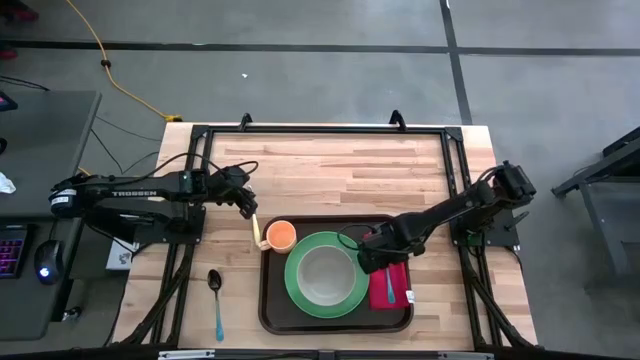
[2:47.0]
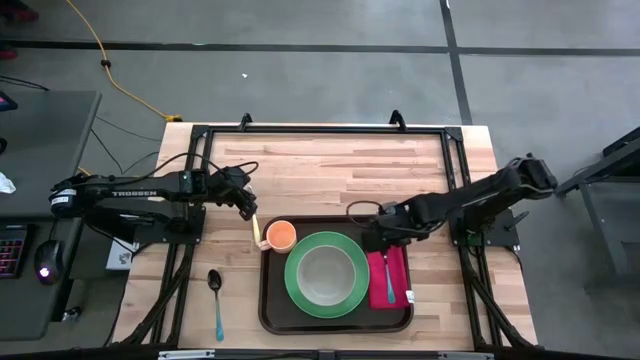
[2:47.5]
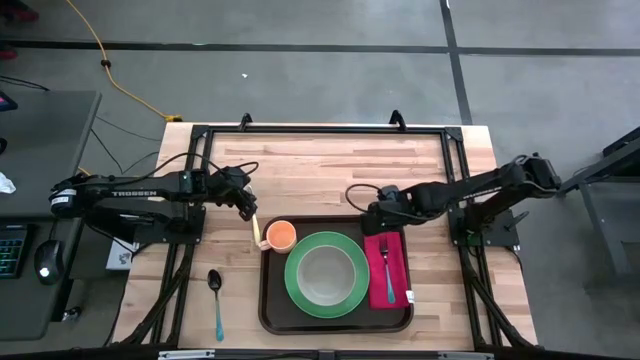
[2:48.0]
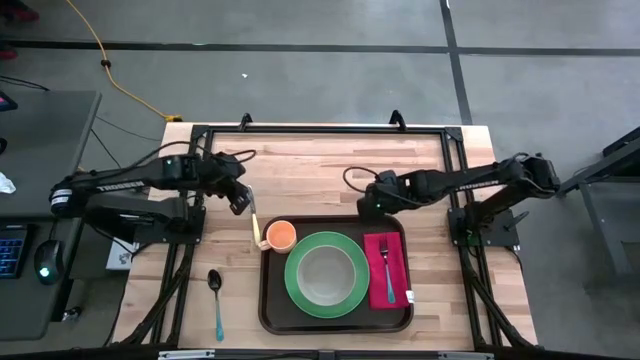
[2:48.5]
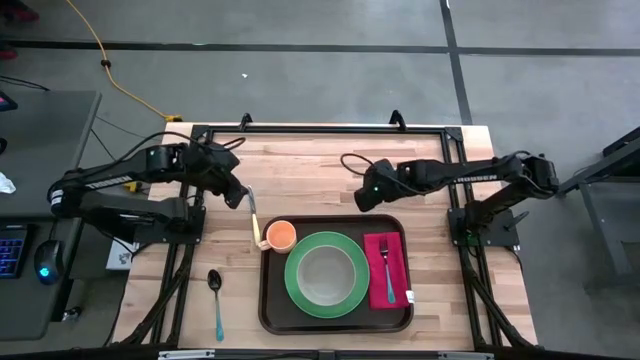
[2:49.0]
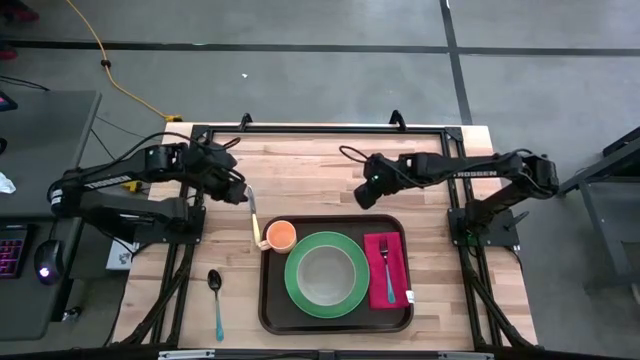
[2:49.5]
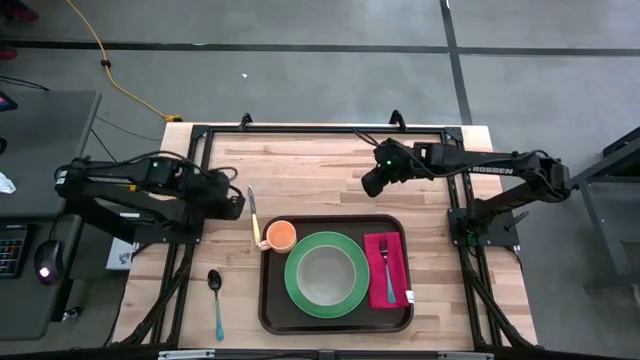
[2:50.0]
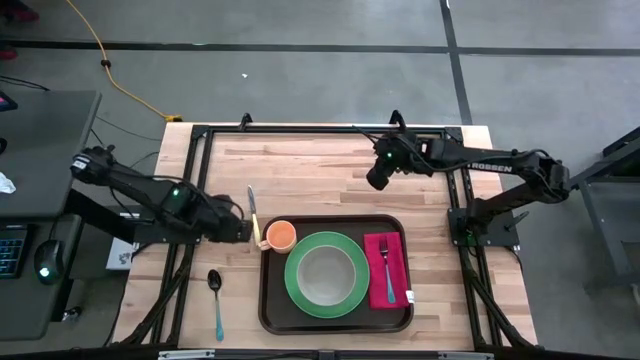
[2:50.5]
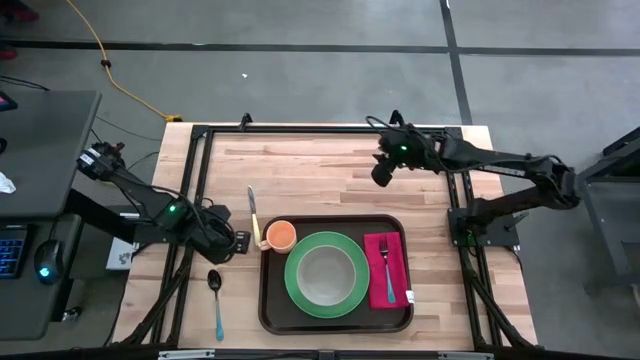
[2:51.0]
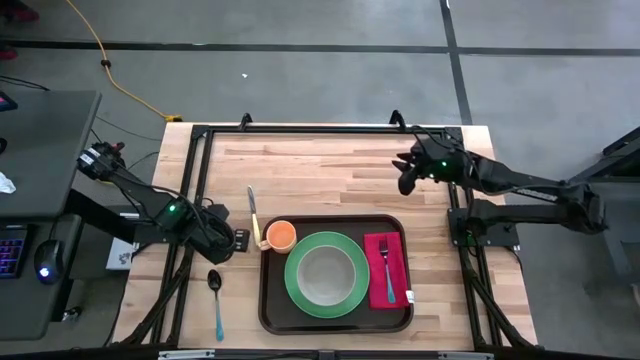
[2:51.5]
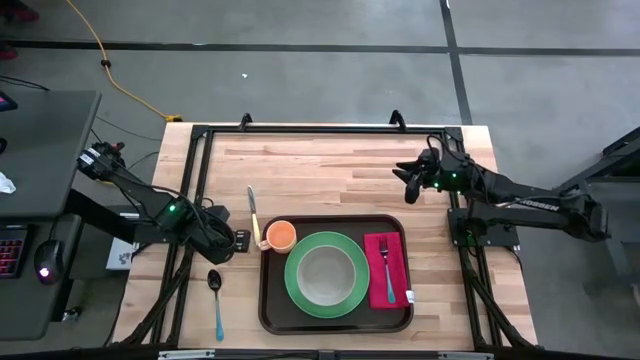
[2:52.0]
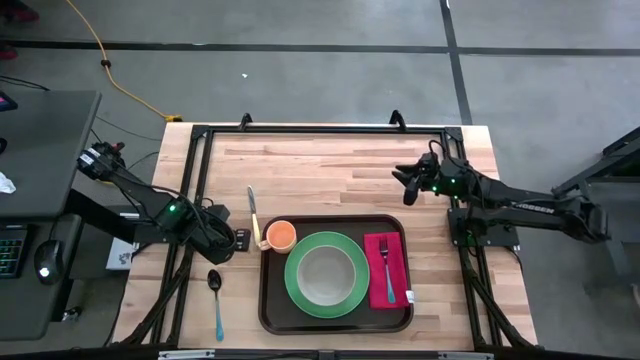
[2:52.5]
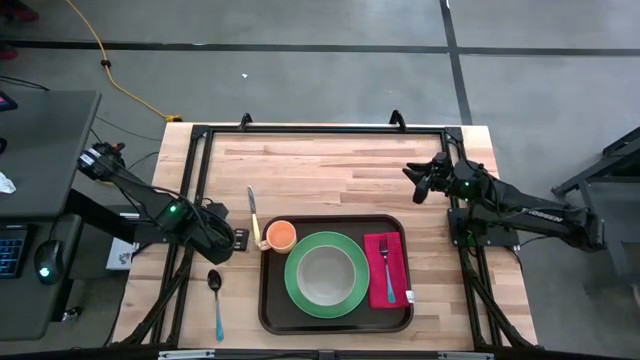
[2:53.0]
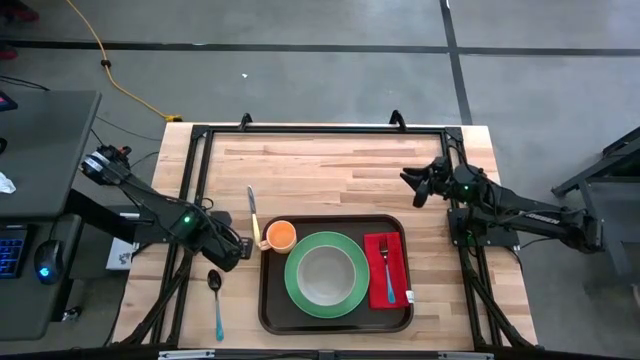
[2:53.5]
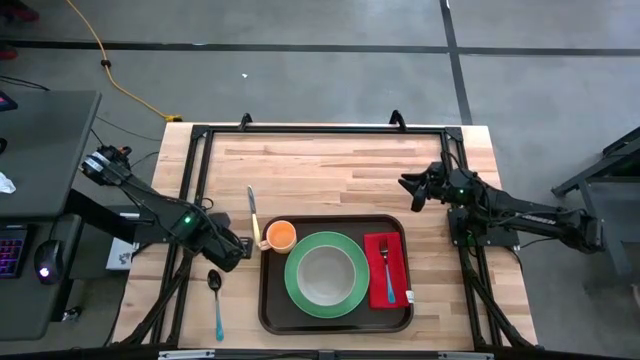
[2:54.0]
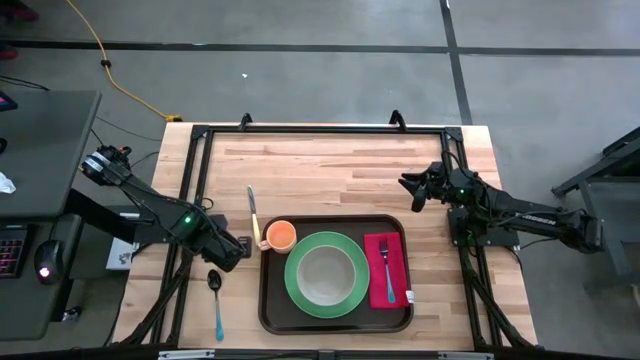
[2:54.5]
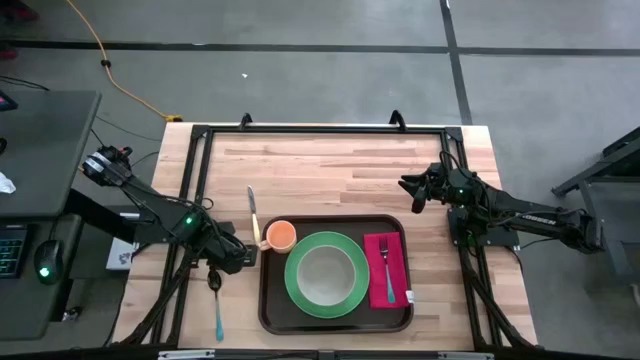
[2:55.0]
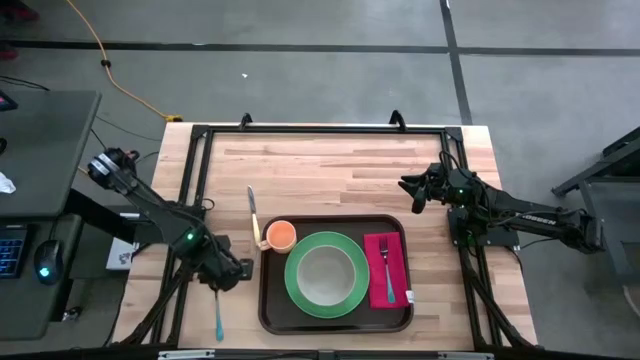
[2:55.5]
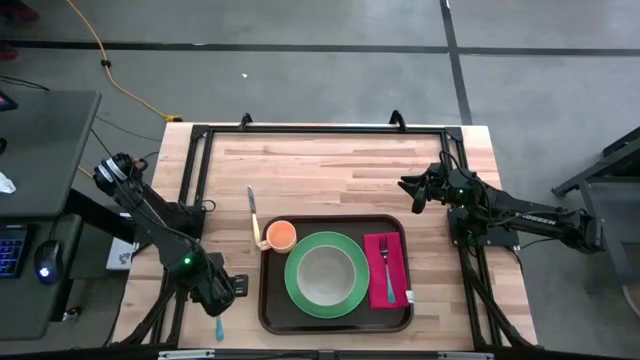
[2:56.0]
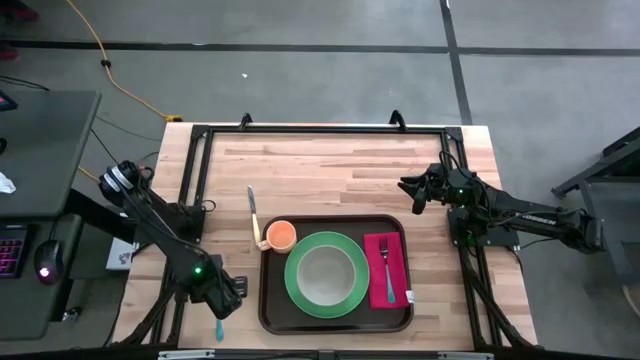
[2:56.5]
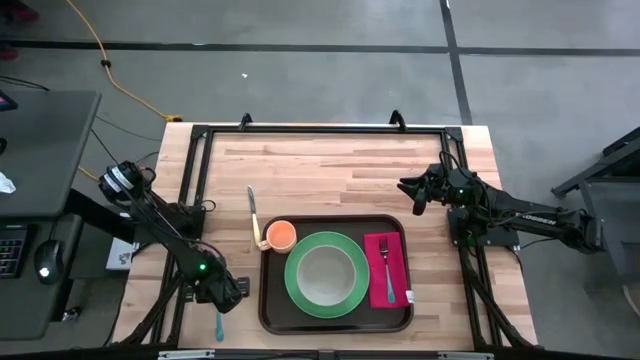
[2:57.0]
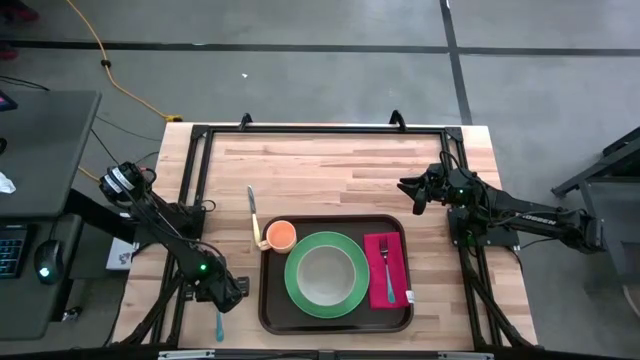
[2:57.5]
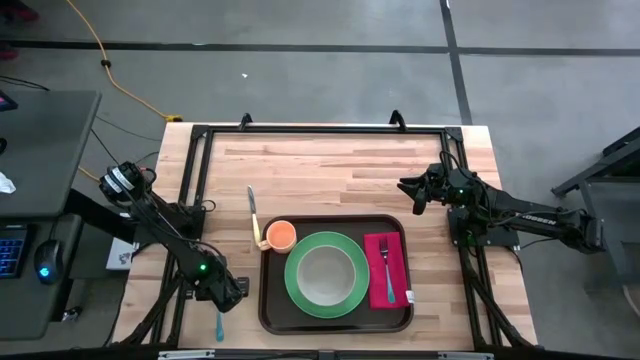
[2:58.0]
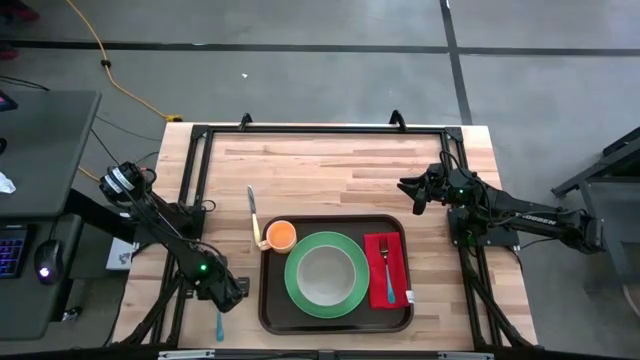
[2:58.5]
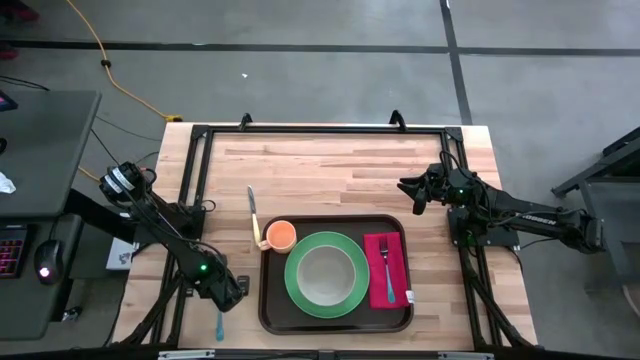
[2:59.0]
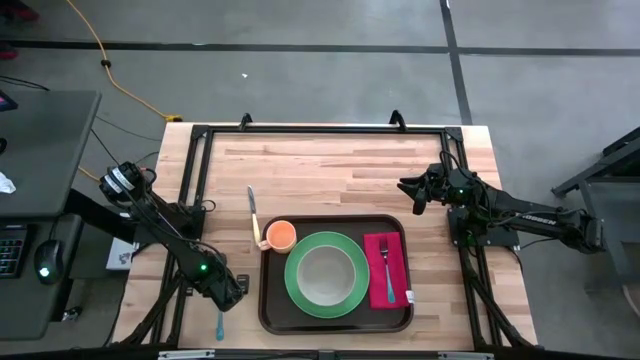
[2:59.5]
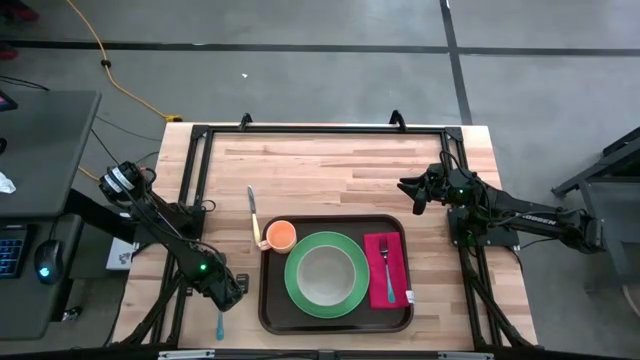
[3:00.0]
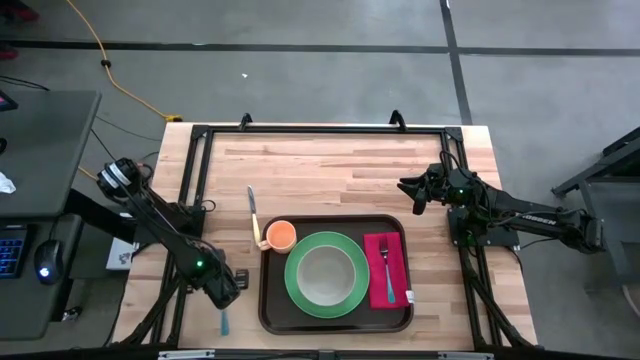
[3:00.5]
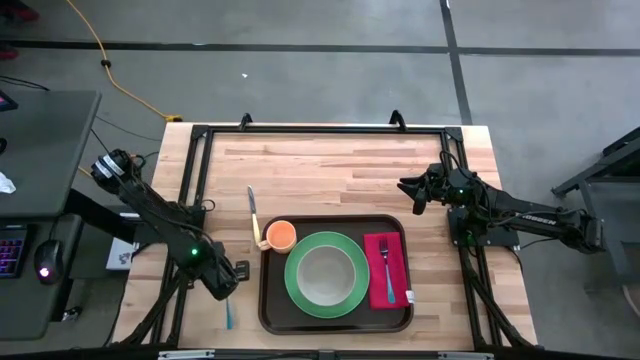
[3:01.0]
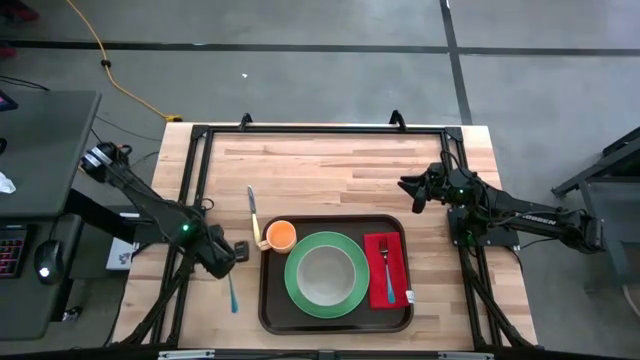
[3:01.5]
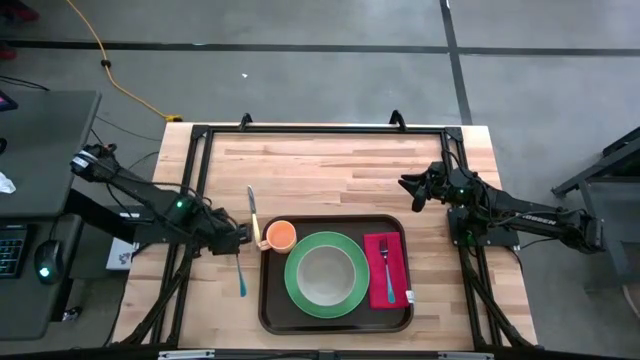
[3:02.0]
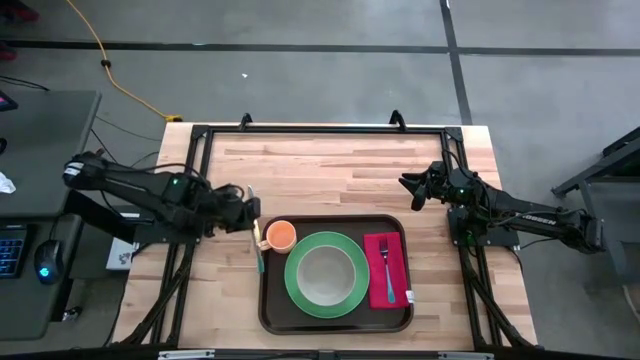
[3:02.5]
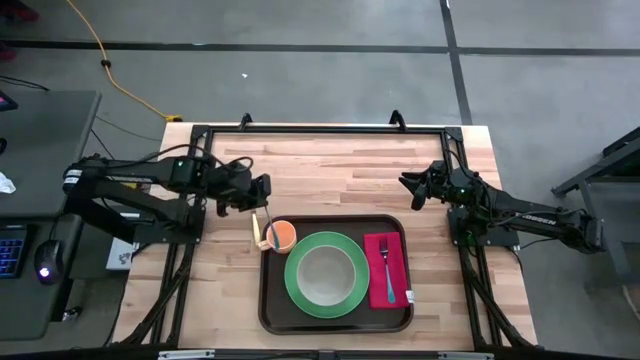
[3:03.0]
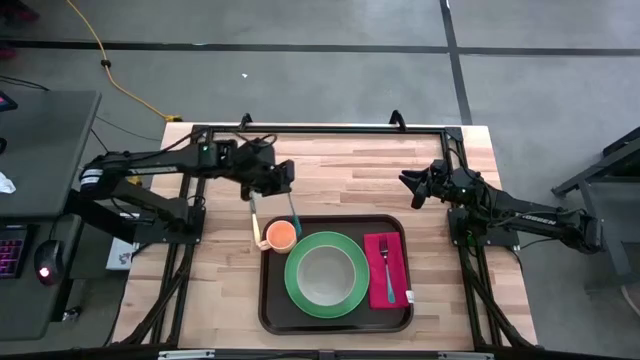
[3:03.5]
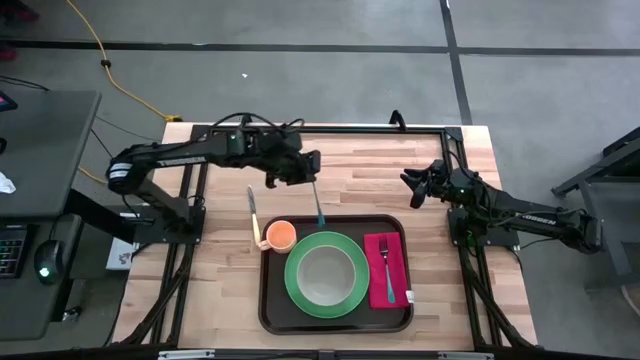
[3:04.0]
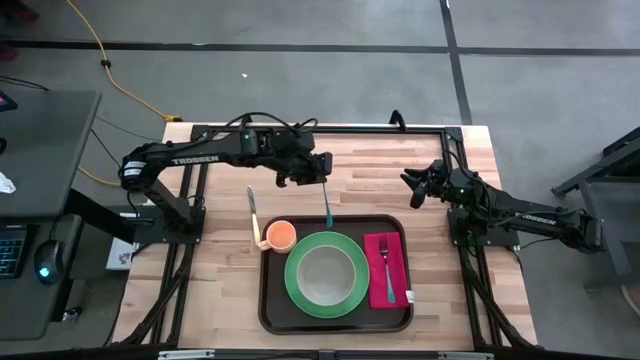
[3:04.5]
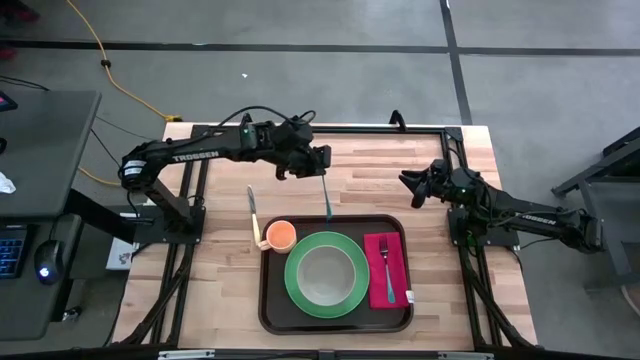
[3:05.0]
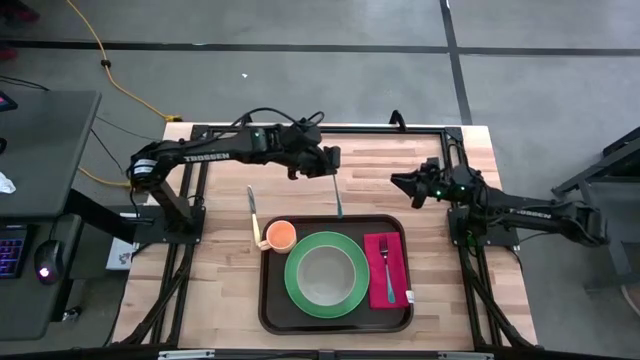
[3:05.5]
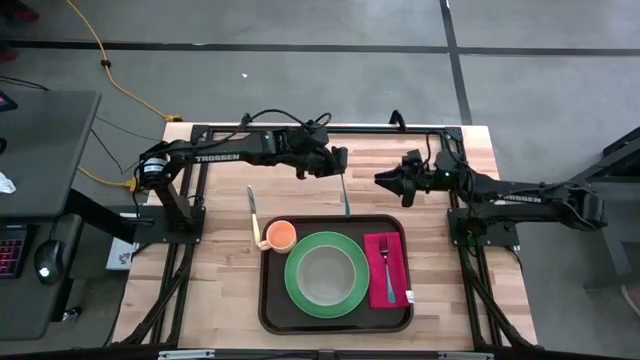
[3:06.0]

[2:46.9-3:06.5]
Task: Set up tray
Put the blue spoon on top of the red napkin to the left of the blue fork on the black tray
